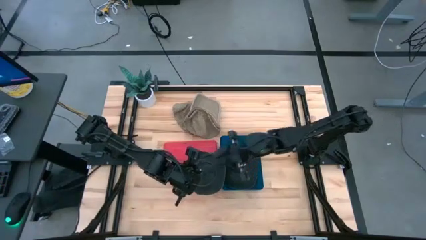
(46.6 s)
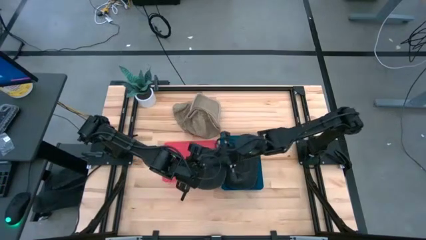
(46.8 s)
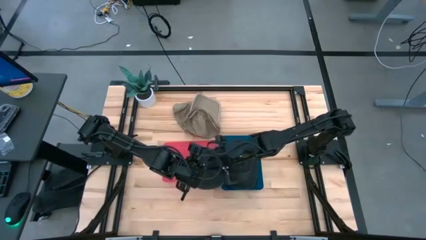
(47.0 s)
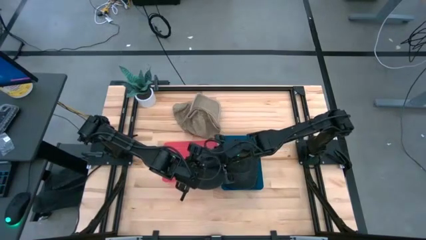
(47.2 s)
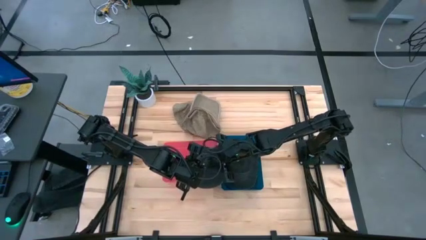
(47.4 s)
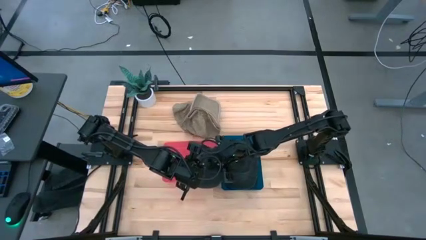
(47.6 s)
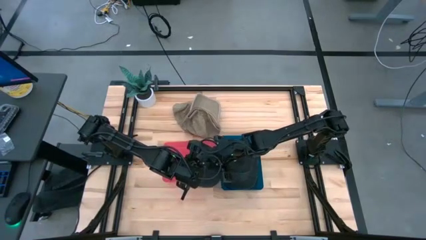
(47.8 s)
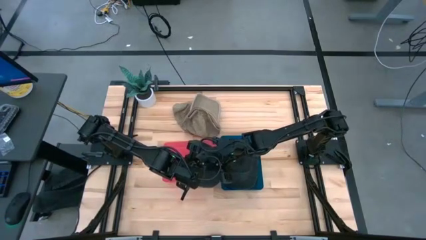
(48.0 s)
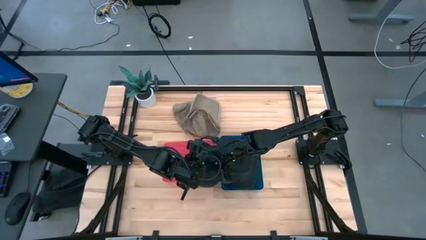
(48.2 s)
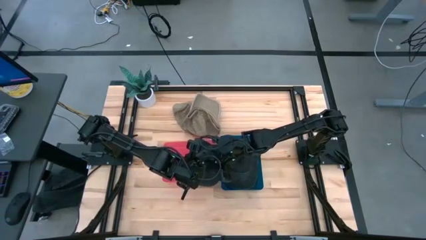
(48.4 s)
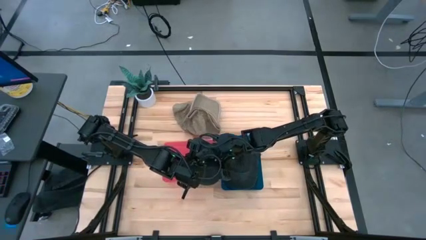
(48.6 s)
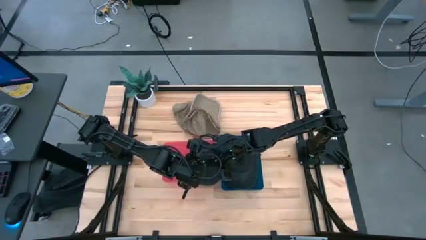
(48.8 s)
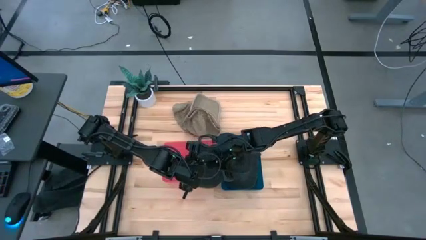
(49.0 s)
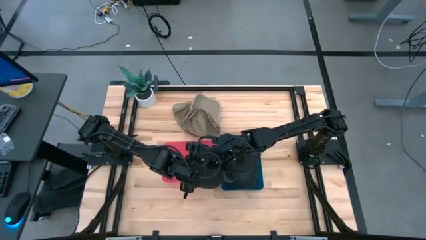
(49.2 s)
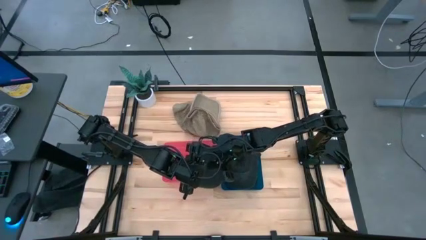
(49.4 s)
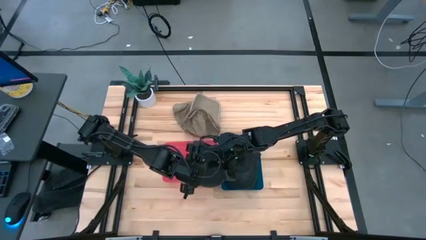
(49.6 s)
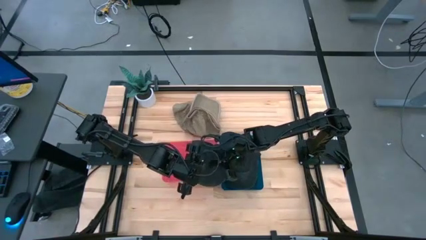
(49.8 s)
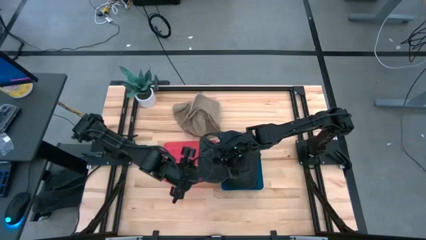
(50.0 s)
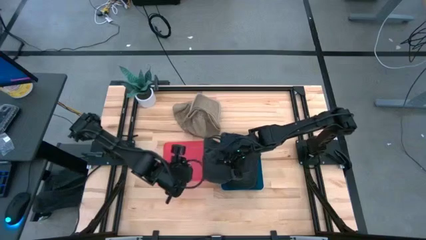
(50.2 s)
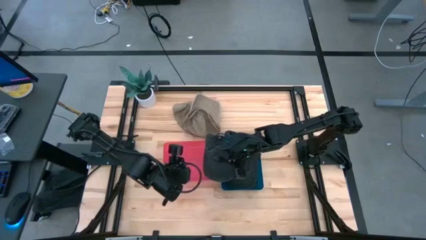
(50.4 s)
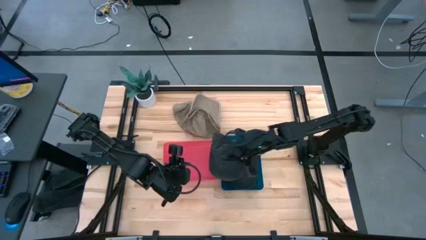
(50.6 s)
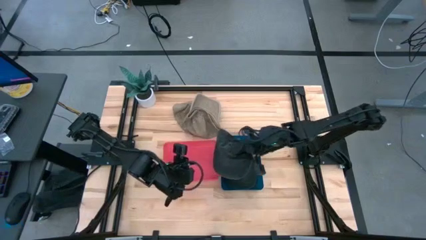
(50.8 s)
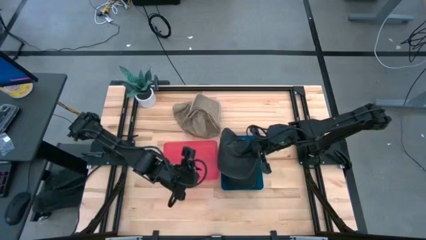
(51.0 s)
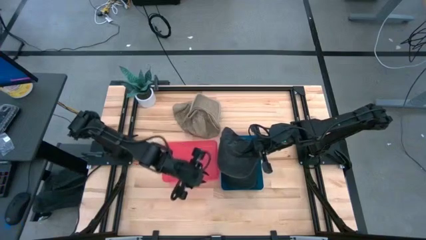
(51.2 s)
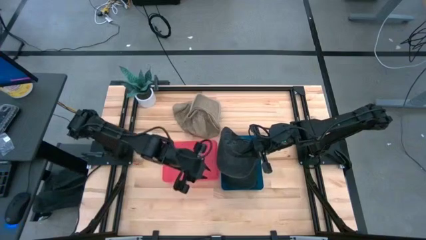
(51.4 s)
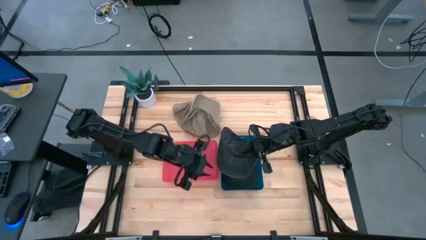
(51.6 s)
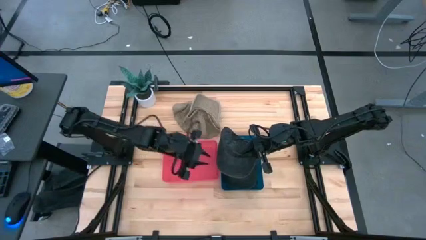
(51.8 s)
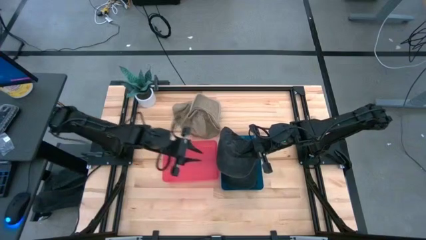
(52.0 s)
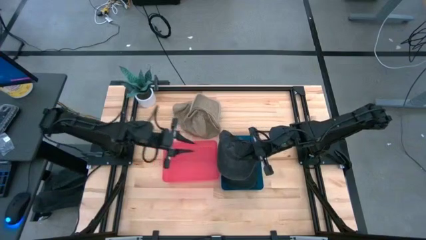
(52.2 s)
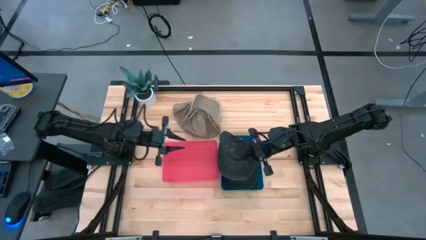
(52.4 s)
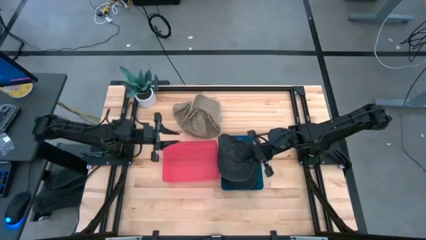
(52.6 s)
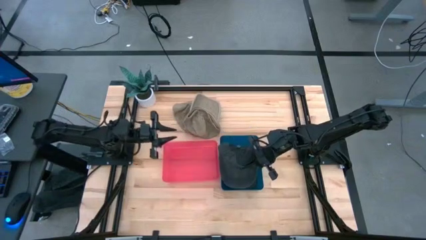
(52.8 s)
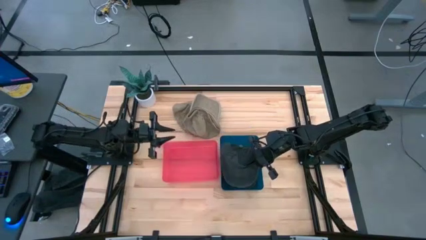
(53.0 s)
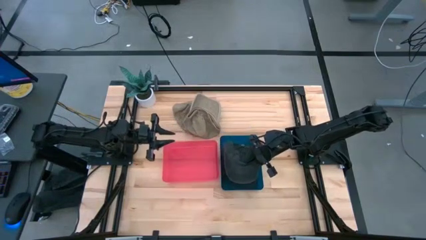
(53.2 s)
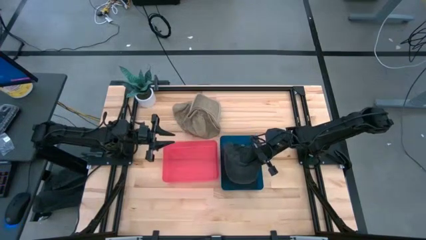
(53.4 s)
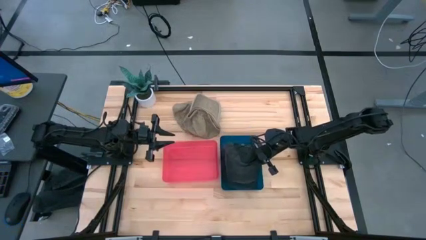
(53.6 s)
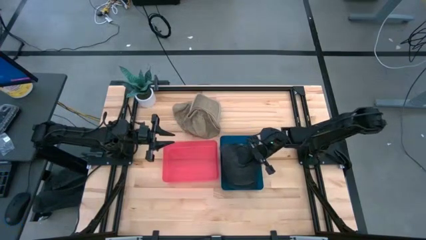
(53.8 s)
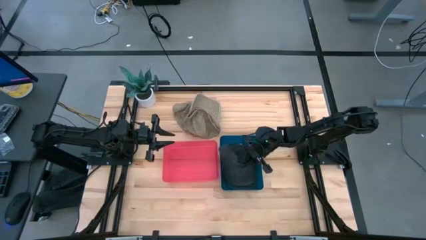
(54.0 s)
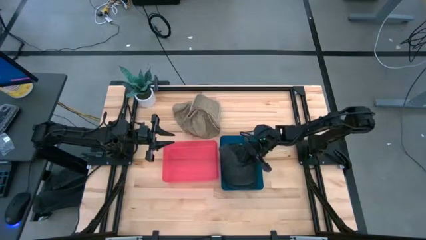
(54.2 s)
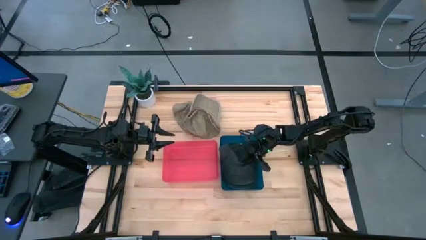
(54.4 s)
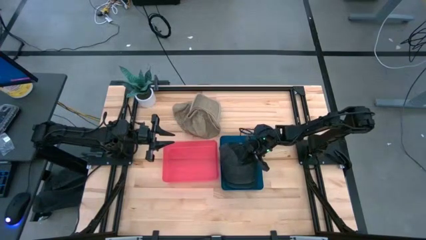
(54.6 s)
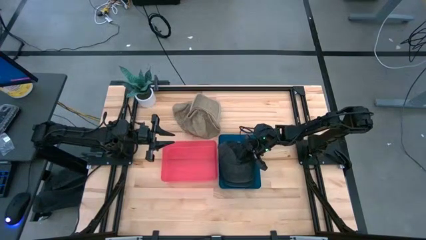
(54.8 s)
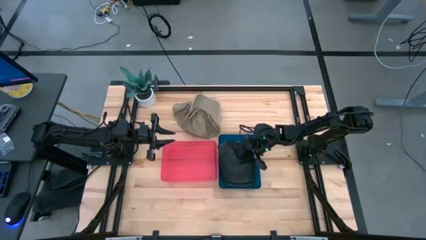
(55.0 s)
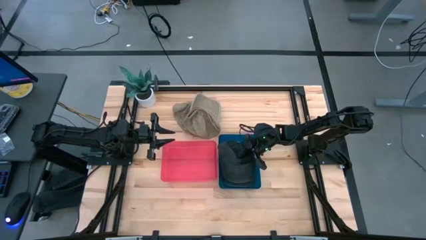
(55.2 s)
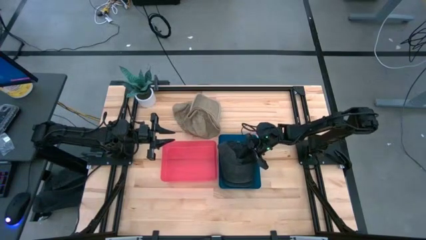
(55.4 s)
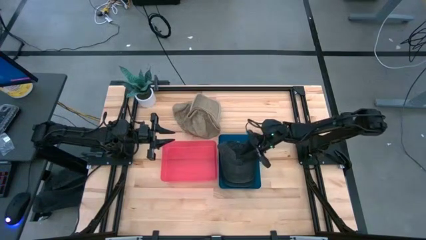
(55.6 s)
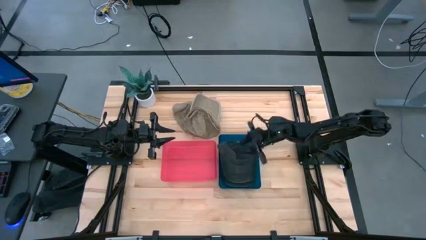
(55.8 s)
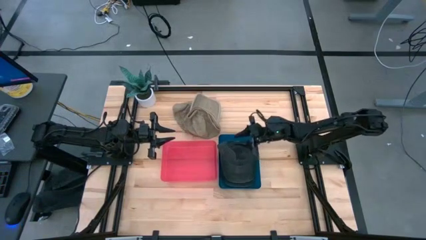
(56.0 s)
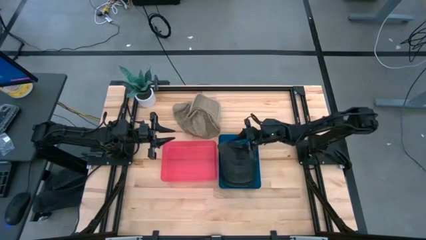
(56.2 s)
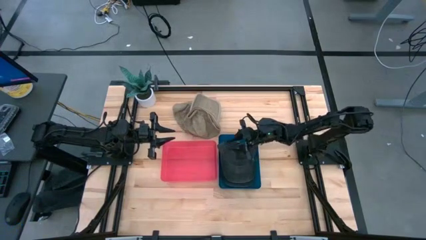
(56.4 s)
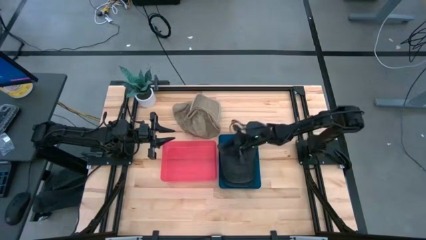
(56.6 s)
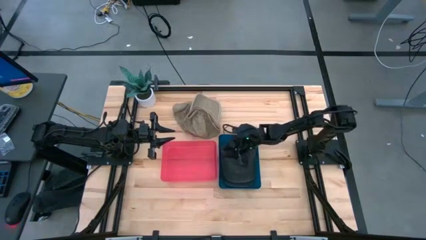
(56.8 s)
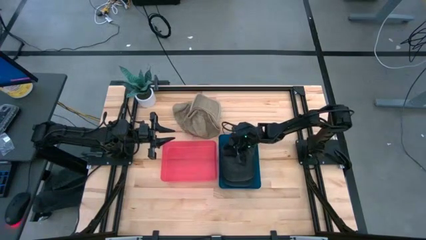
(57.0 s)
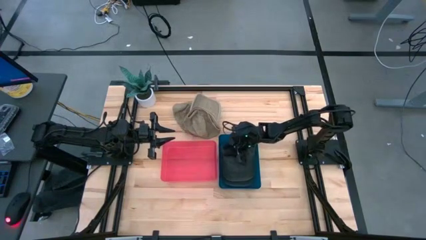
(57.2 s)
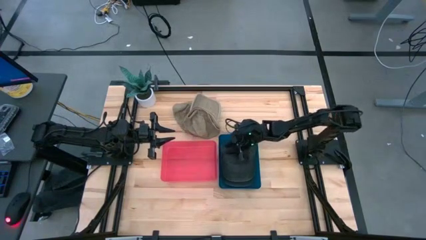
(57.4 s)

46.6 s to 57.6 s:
Task: Pick & Place hat
Put the black cap into the blue bin
